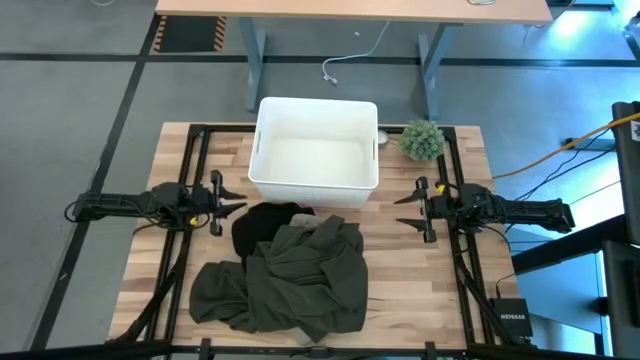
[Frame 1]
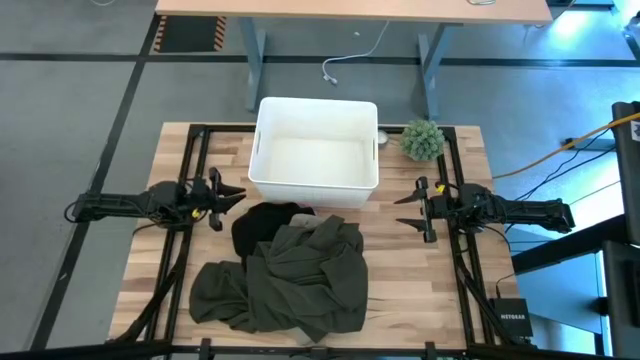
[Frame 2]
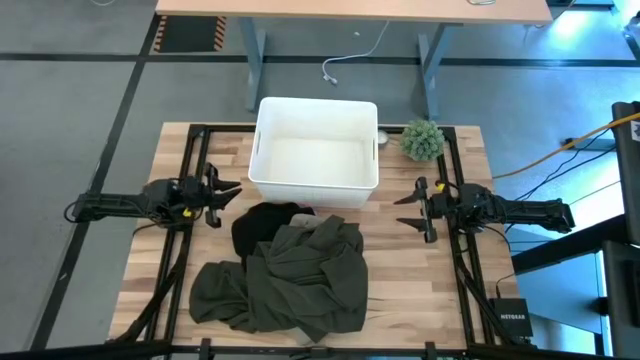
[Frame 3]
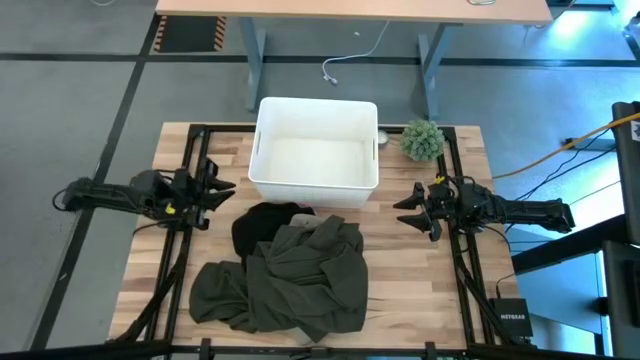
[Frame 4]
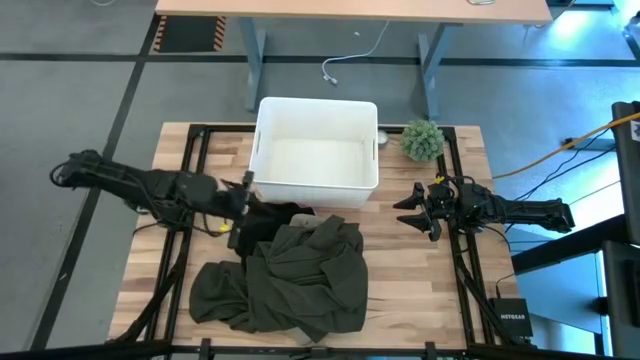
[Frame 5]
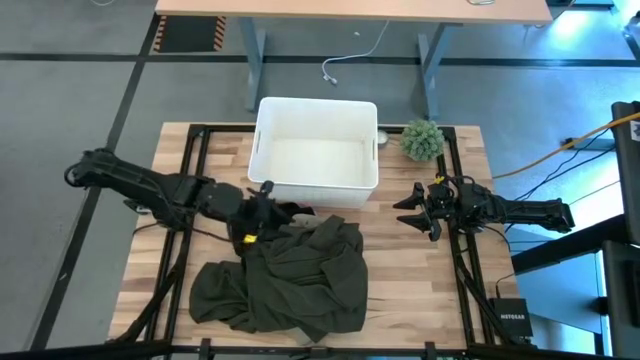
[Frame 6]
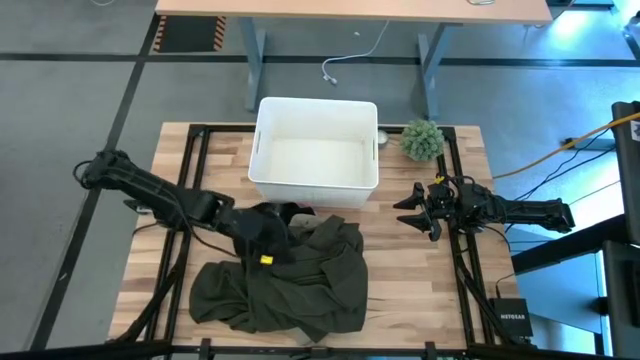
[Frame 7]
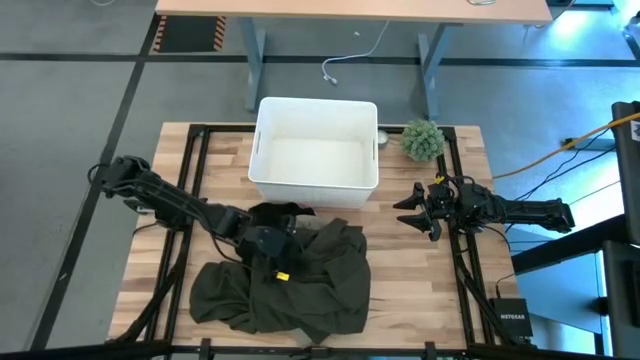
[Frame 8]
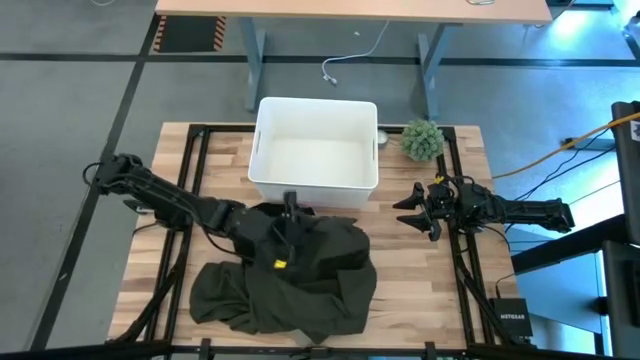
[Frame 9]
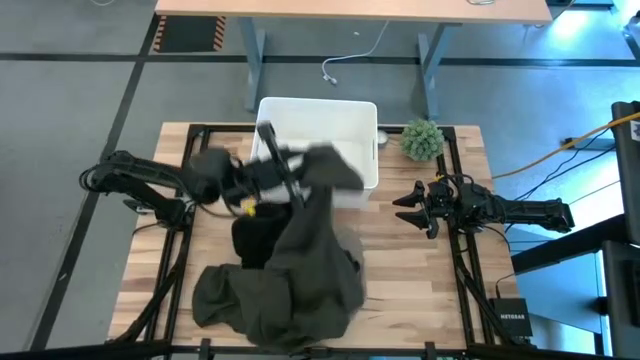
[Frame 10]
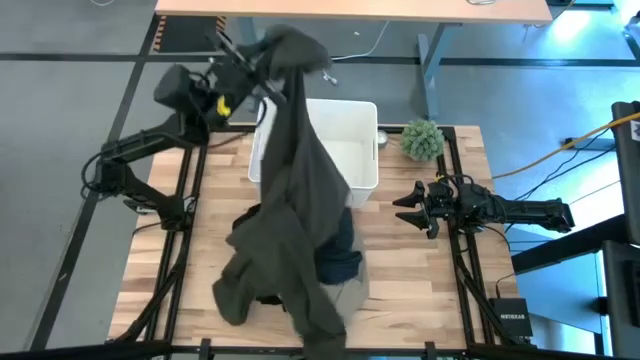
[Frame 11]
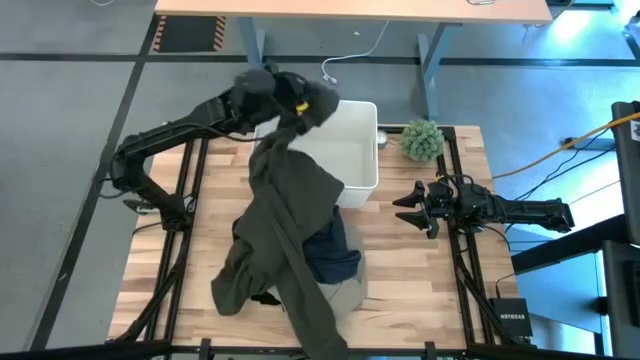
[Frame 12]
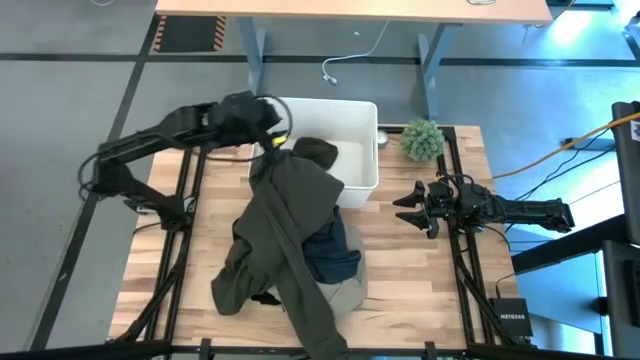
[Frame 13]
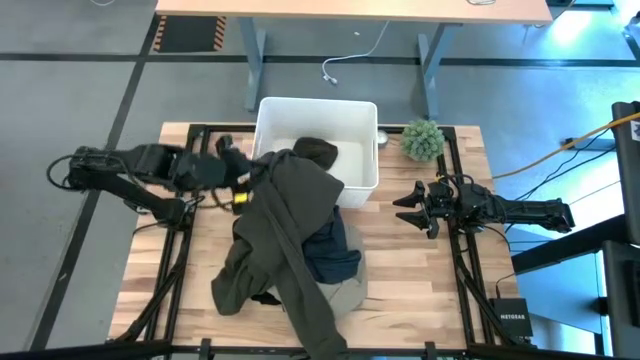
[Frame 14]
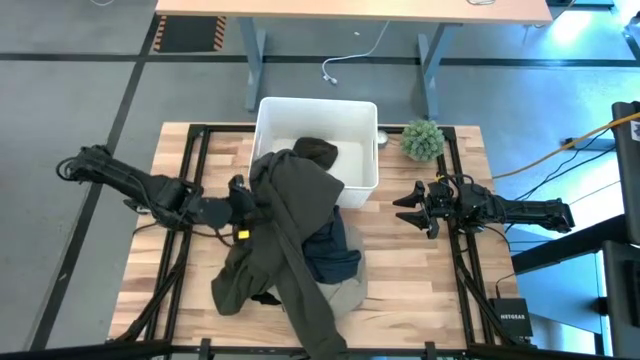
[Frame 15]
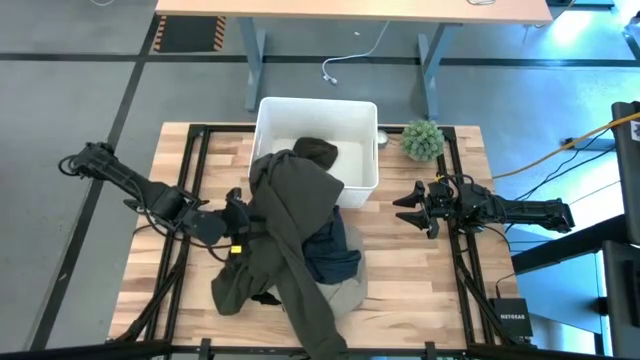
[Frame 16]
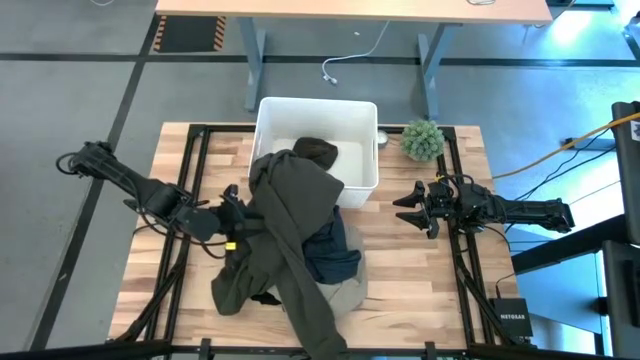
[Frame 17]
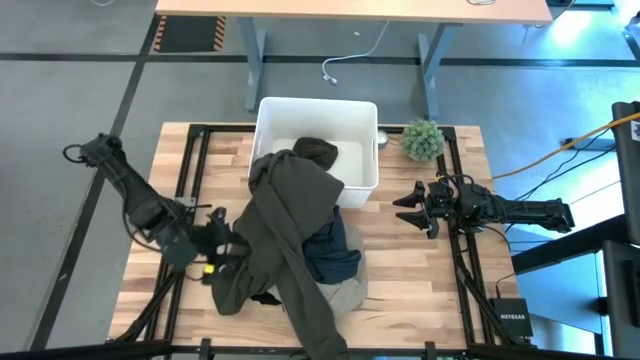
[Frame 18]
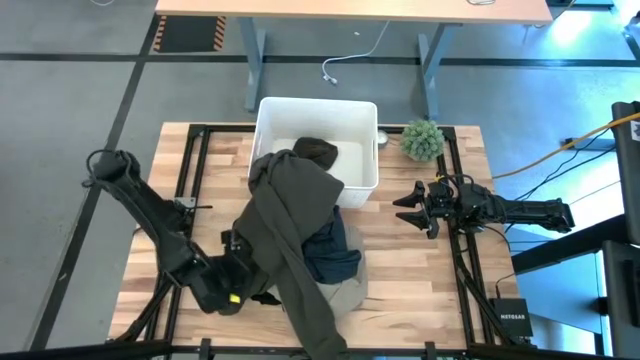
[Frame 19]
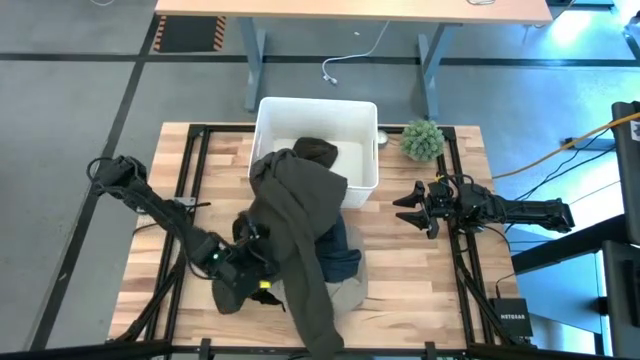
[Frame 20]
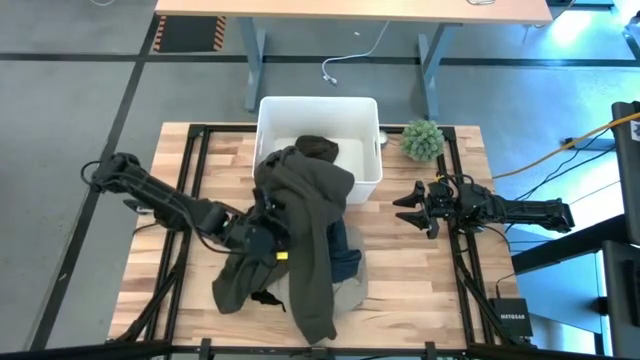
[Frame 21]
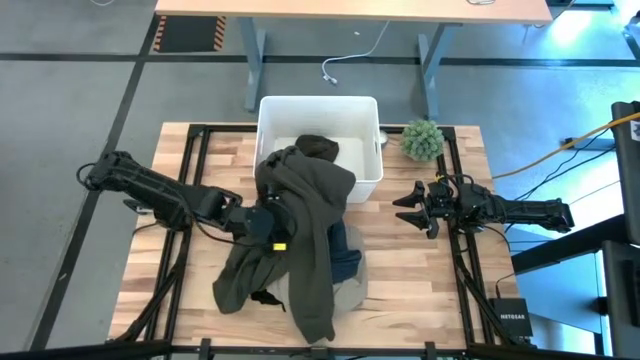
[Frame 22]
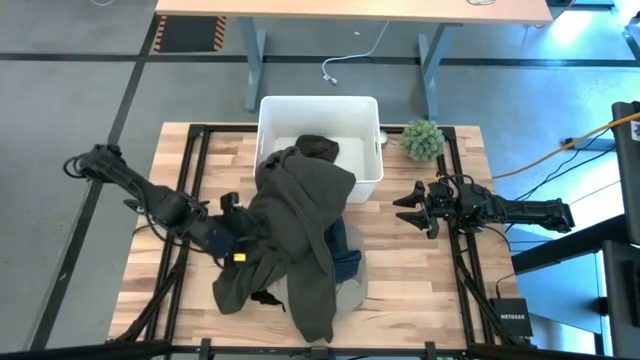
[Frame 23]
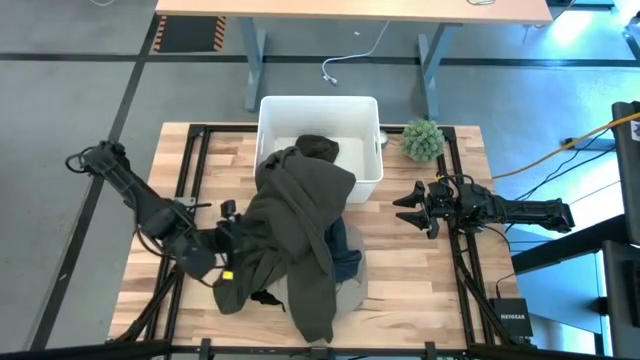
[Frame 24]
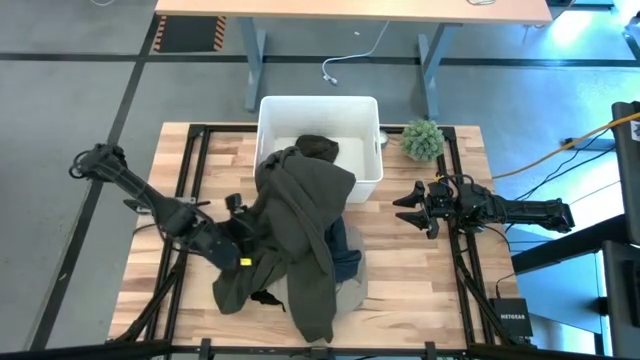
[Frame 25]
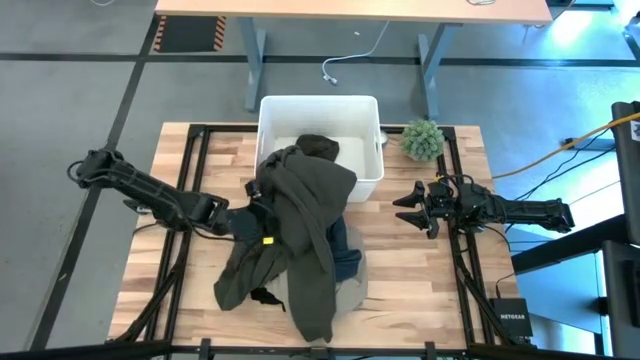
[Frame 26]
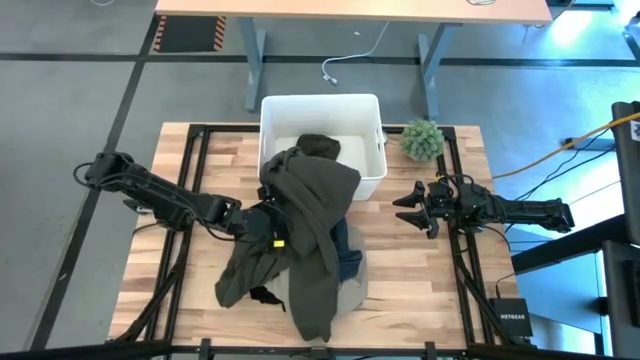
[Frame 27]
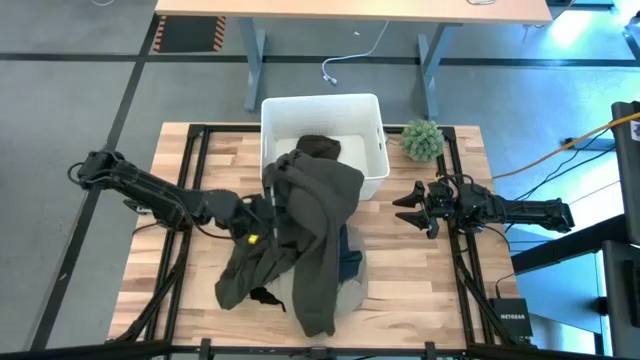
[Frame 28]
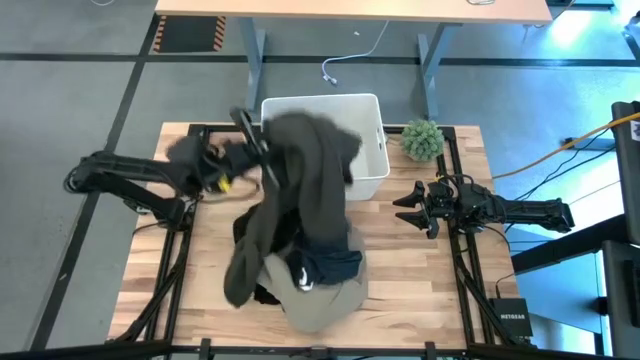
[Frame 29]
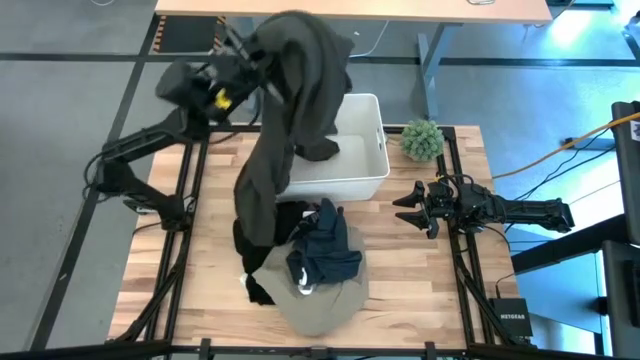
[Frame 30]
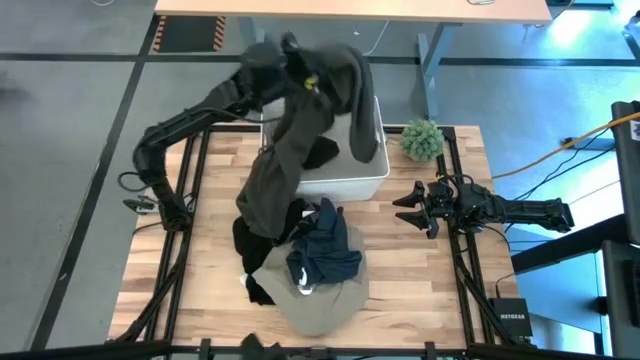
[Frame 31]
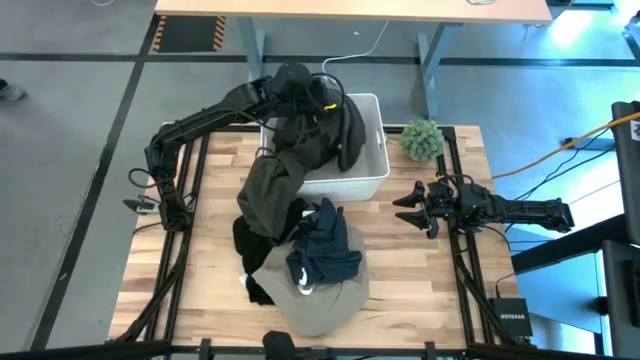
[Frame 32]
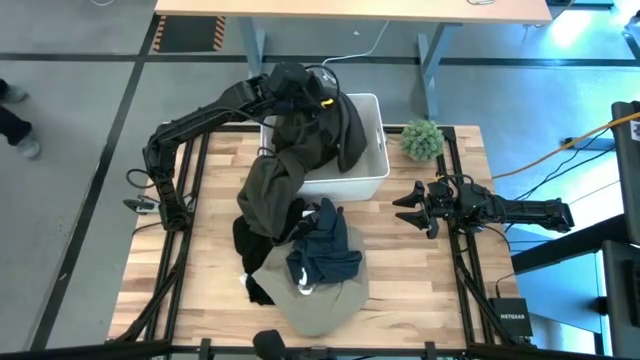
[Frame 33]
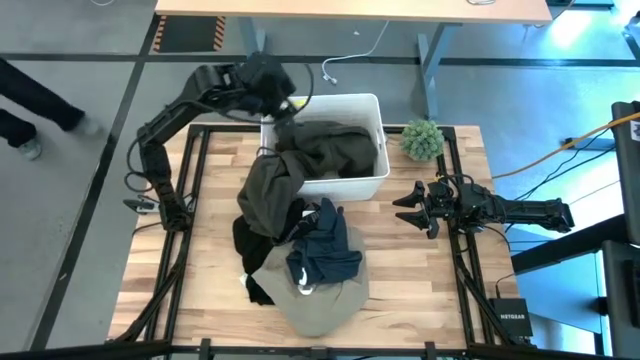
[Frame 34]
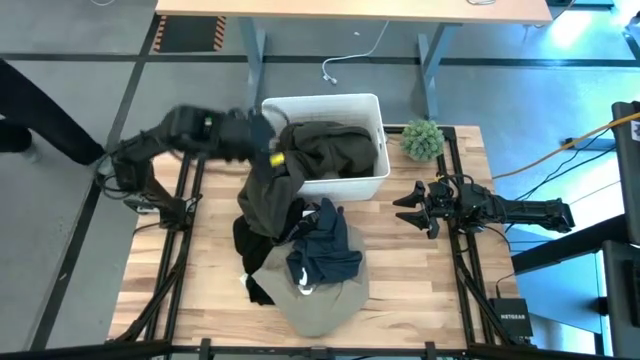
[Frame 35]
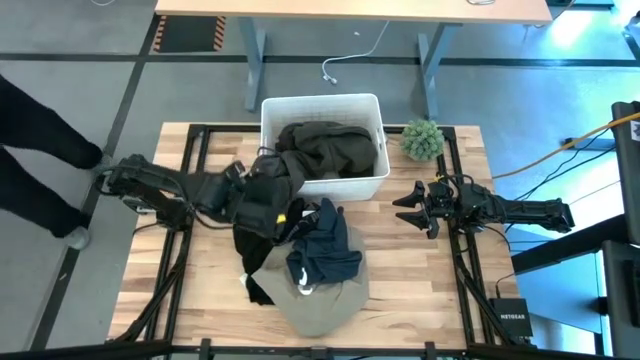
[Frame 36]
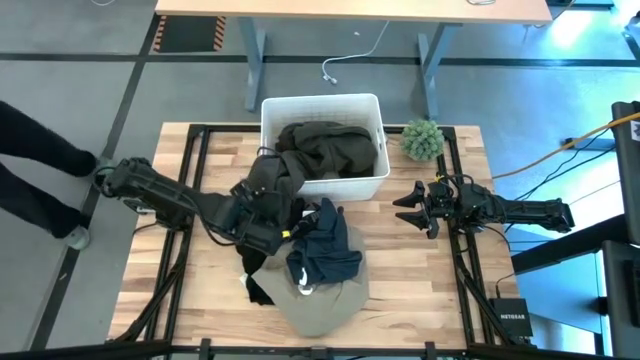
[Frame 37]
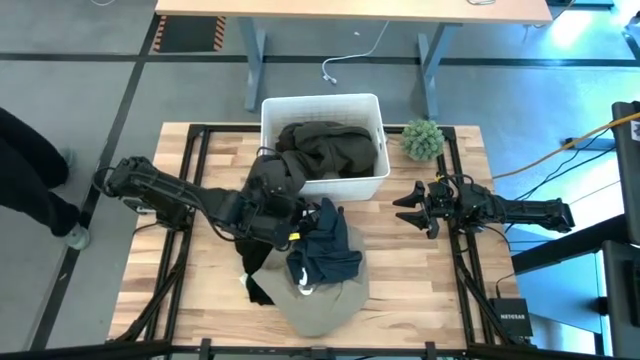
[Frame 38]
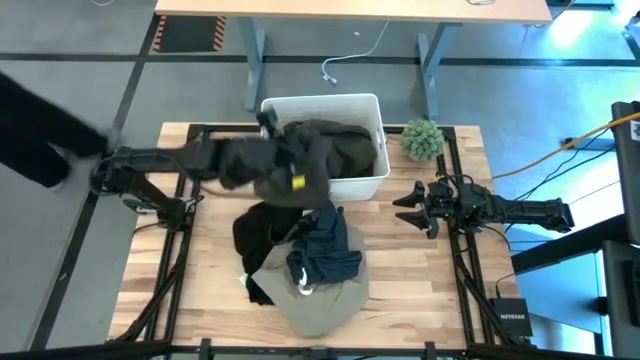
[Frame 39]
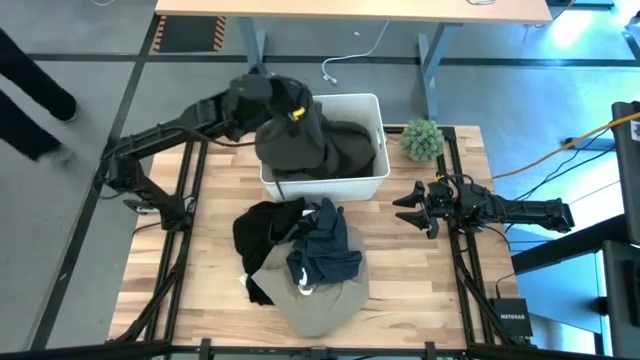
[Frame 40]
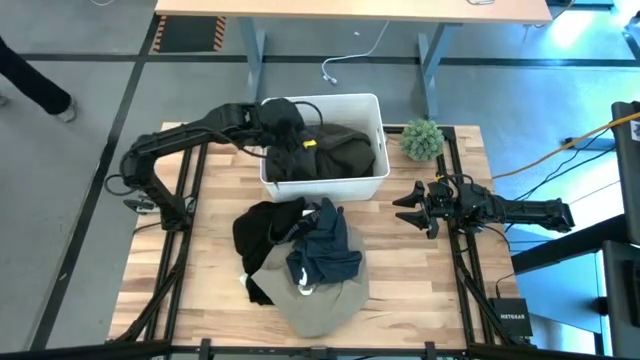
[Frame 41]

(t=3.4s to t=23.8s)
Task: Sort clothes
Put the green jacket into the white bin
